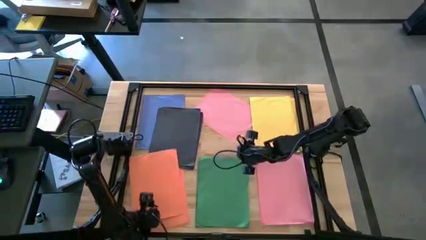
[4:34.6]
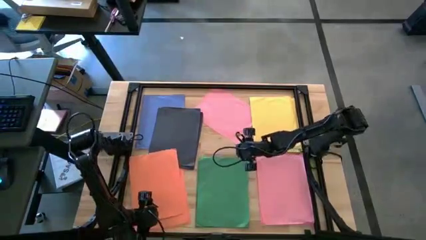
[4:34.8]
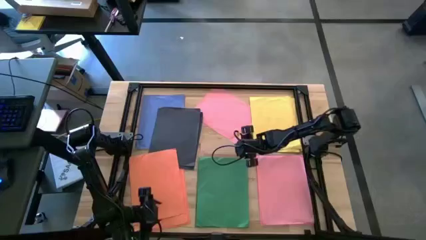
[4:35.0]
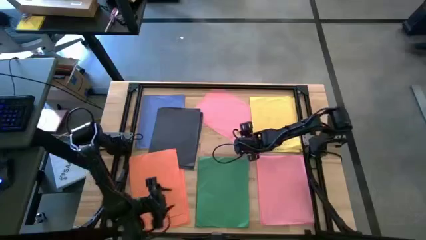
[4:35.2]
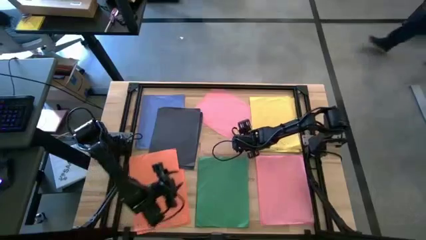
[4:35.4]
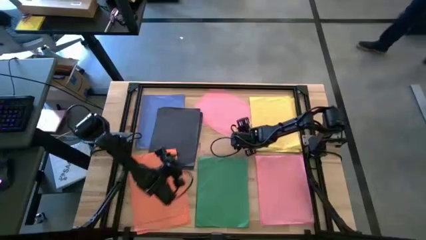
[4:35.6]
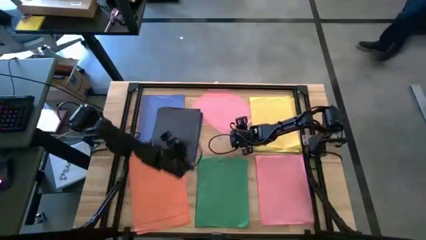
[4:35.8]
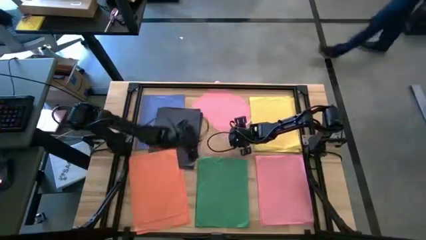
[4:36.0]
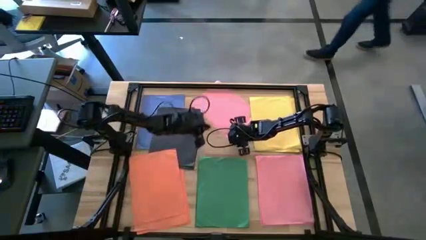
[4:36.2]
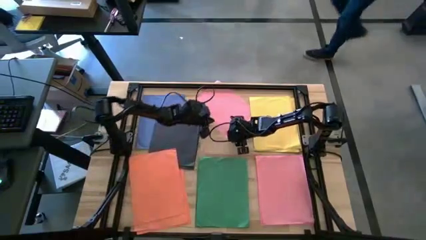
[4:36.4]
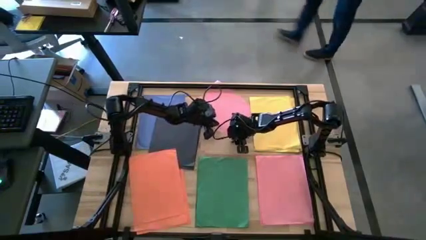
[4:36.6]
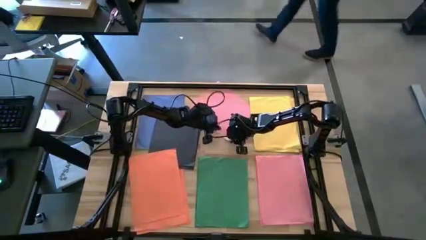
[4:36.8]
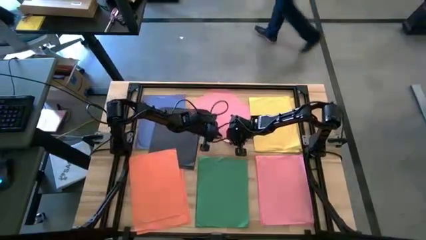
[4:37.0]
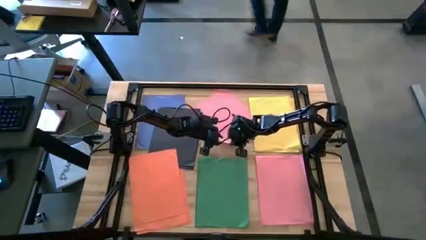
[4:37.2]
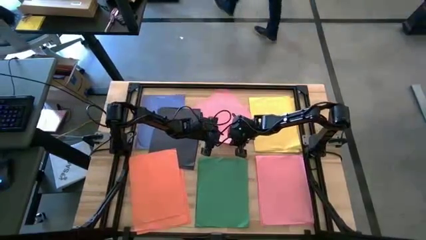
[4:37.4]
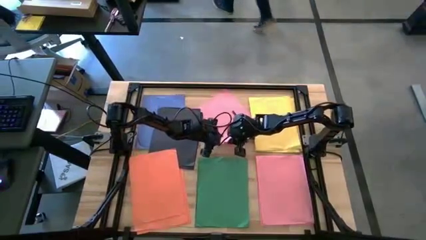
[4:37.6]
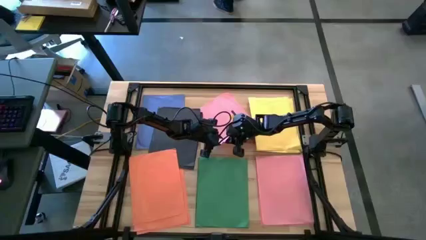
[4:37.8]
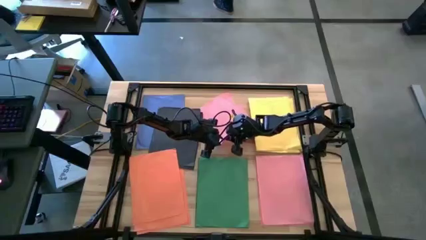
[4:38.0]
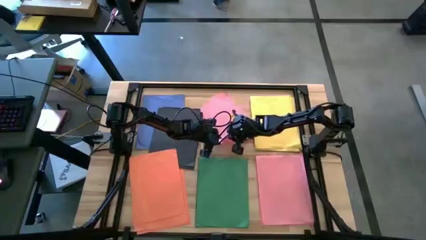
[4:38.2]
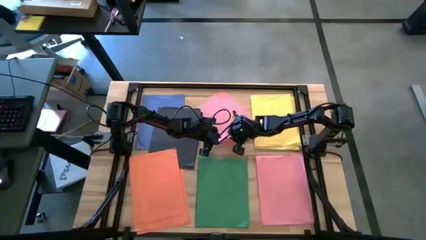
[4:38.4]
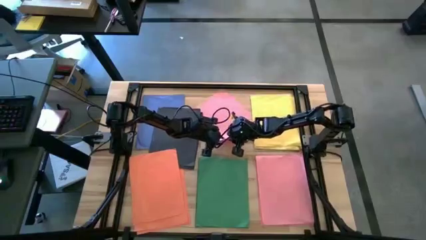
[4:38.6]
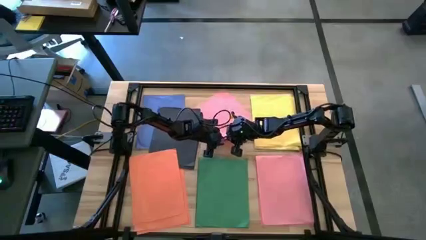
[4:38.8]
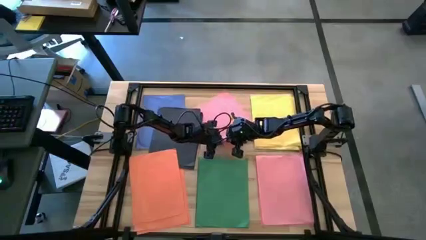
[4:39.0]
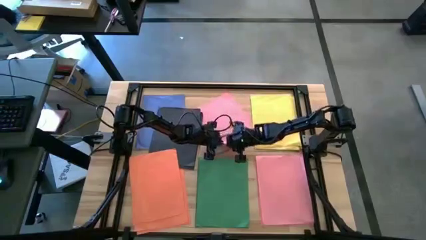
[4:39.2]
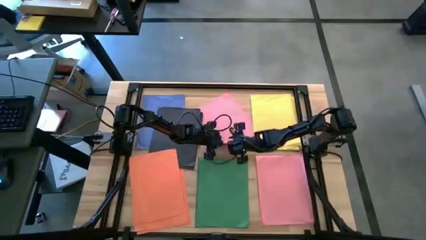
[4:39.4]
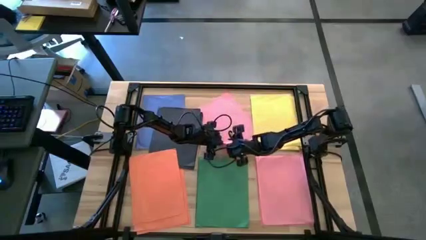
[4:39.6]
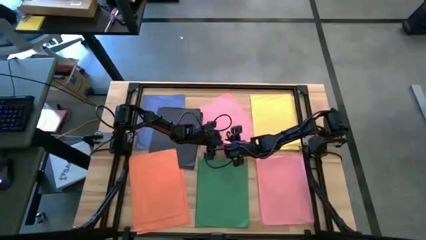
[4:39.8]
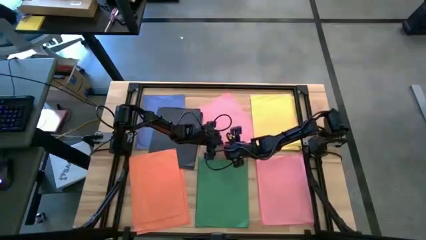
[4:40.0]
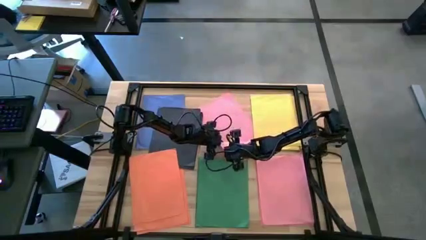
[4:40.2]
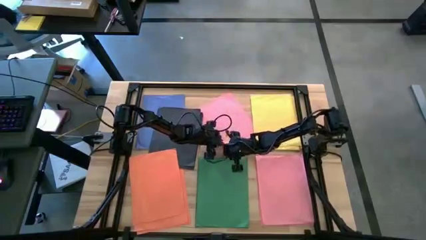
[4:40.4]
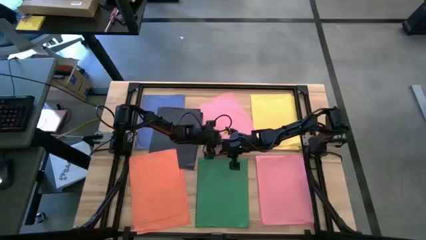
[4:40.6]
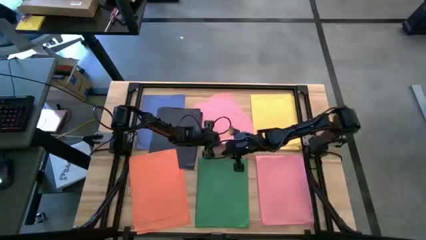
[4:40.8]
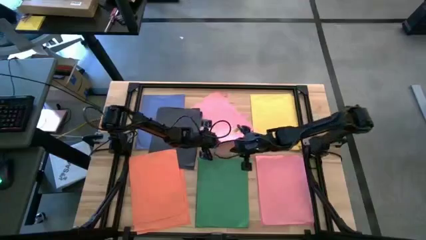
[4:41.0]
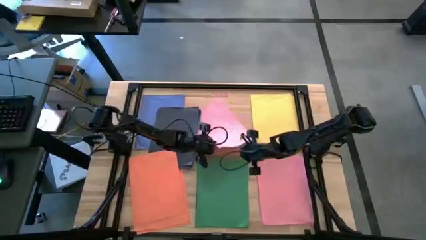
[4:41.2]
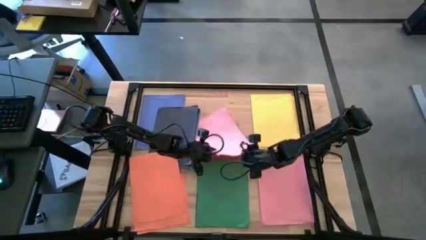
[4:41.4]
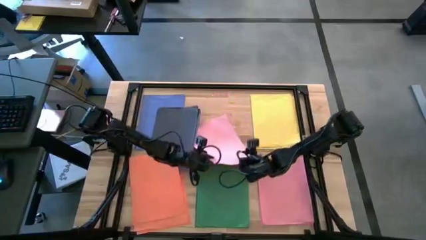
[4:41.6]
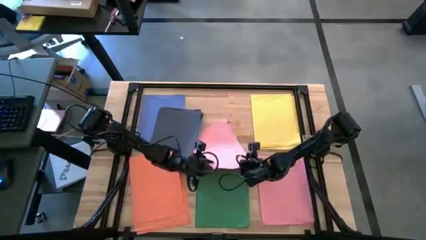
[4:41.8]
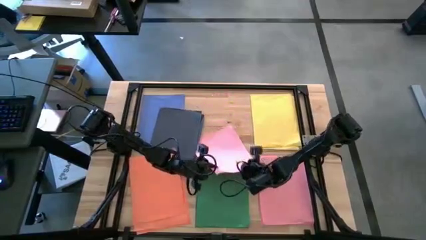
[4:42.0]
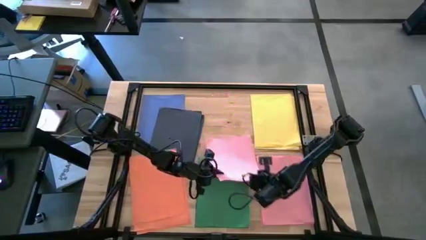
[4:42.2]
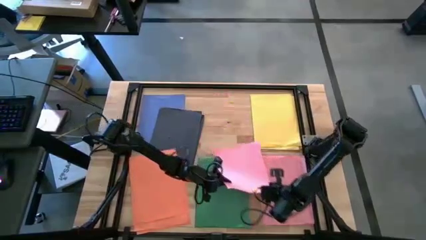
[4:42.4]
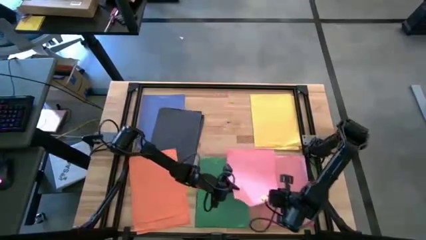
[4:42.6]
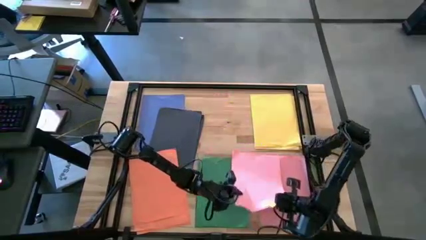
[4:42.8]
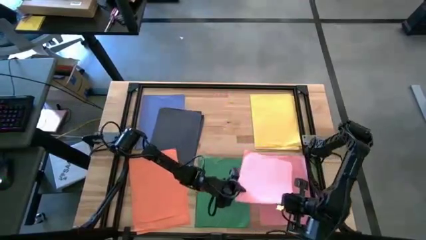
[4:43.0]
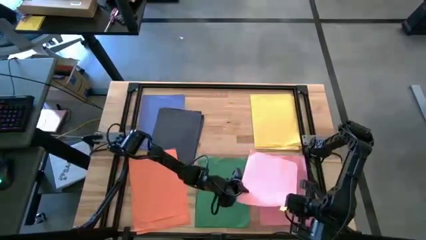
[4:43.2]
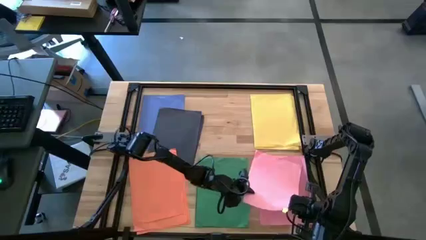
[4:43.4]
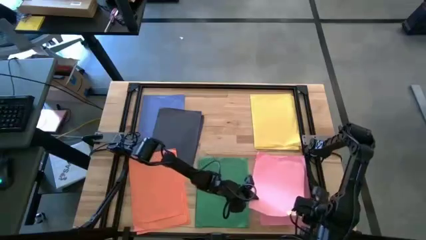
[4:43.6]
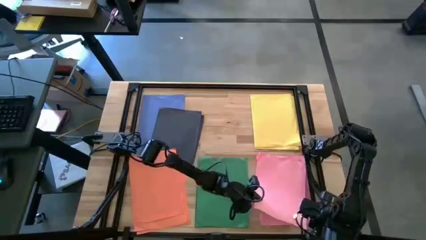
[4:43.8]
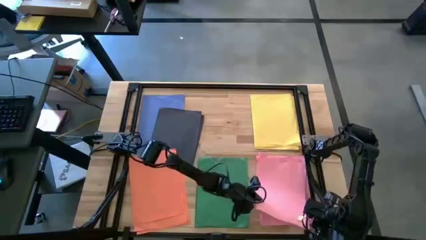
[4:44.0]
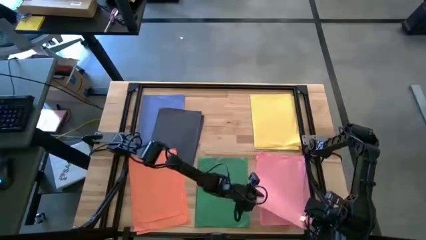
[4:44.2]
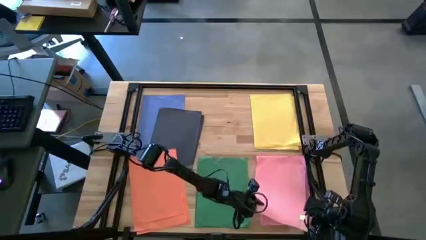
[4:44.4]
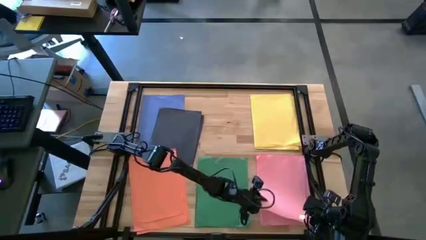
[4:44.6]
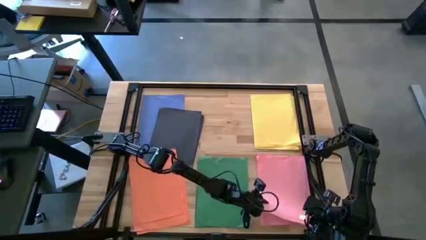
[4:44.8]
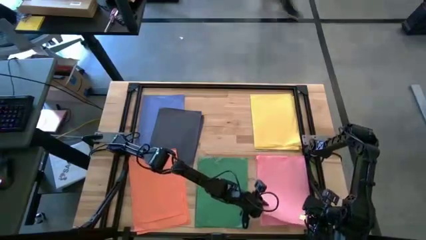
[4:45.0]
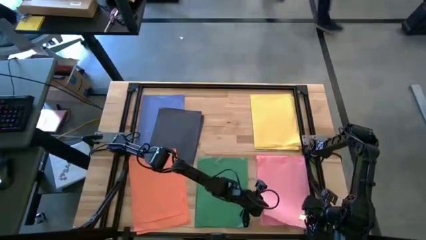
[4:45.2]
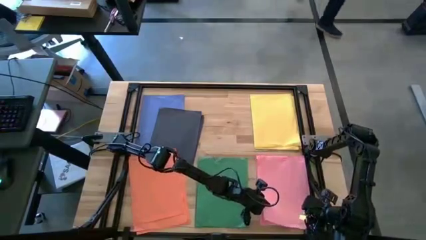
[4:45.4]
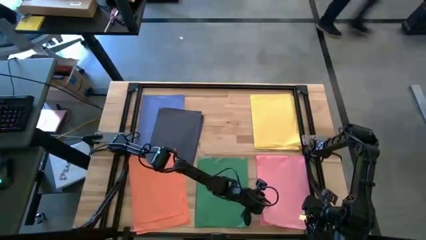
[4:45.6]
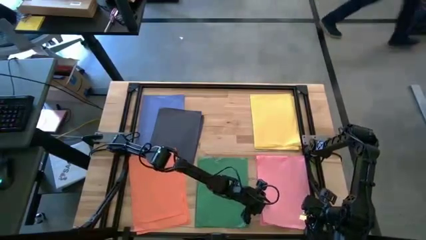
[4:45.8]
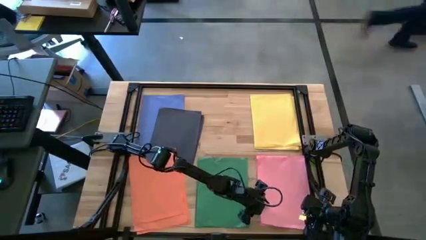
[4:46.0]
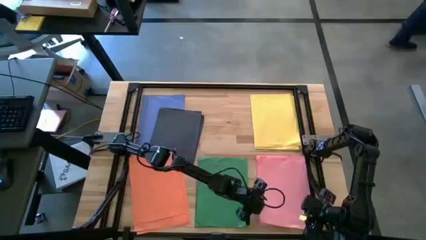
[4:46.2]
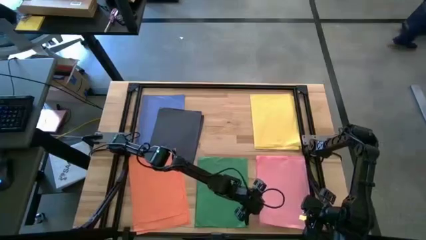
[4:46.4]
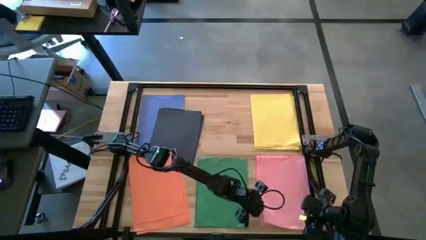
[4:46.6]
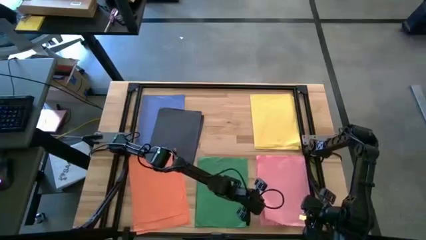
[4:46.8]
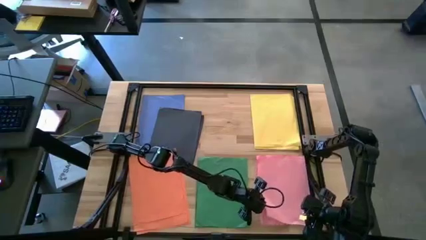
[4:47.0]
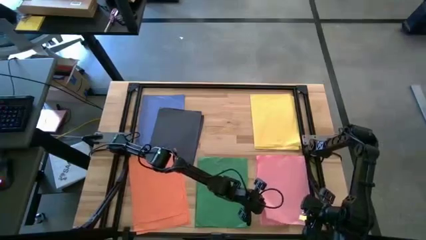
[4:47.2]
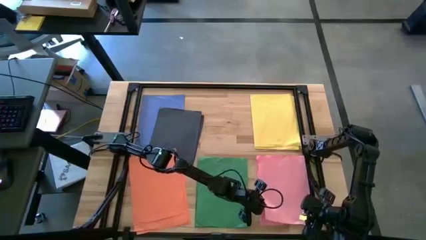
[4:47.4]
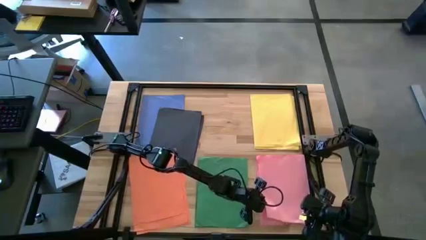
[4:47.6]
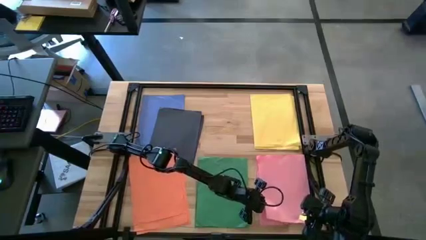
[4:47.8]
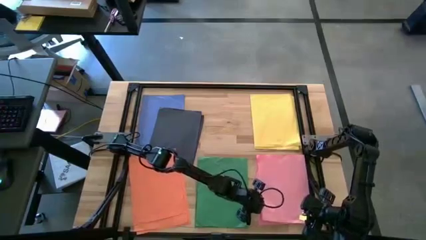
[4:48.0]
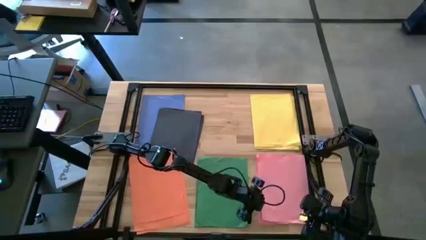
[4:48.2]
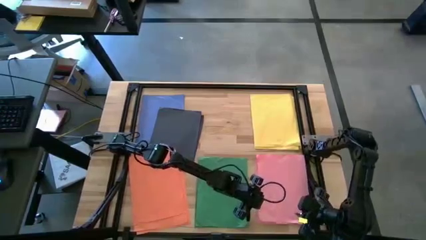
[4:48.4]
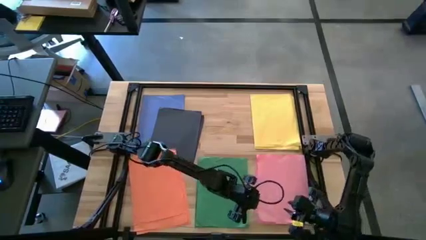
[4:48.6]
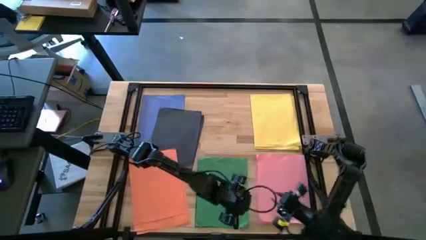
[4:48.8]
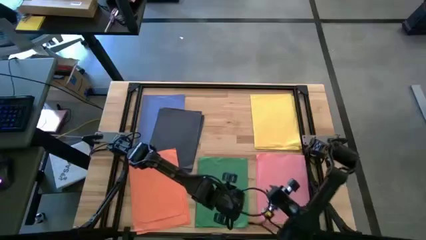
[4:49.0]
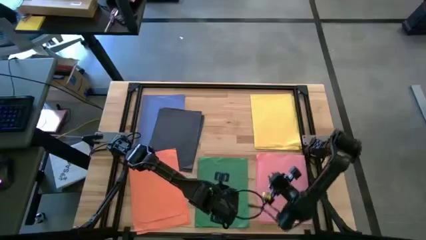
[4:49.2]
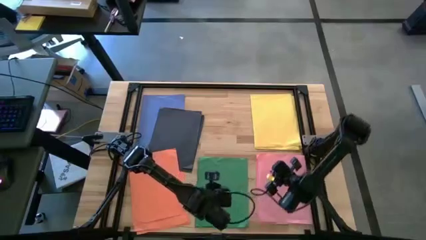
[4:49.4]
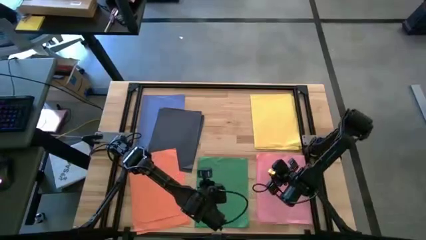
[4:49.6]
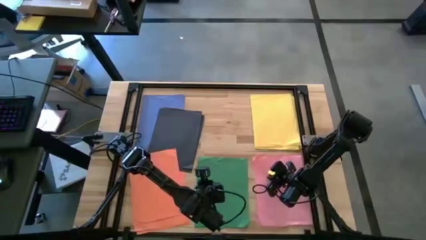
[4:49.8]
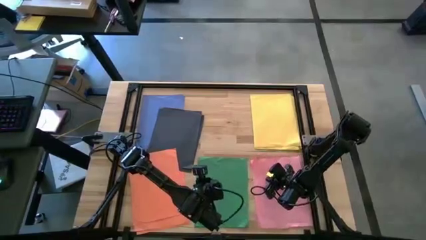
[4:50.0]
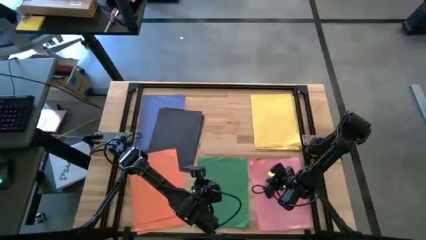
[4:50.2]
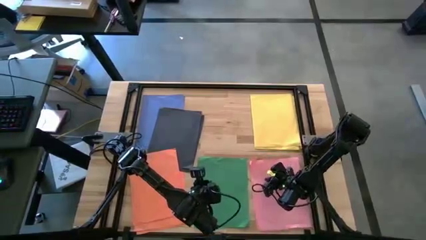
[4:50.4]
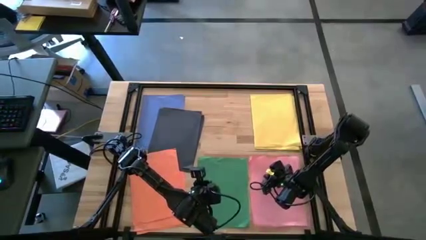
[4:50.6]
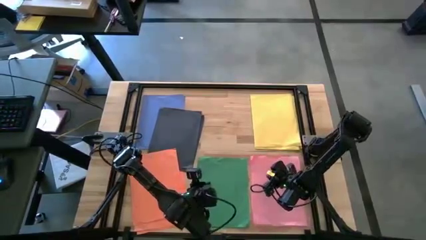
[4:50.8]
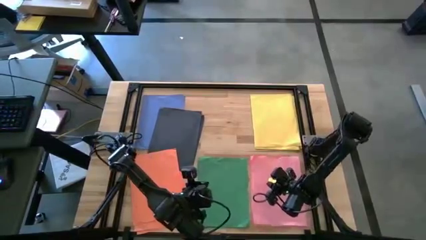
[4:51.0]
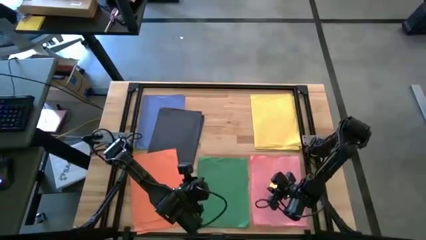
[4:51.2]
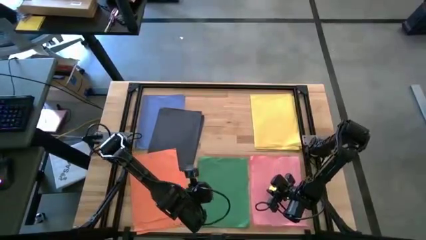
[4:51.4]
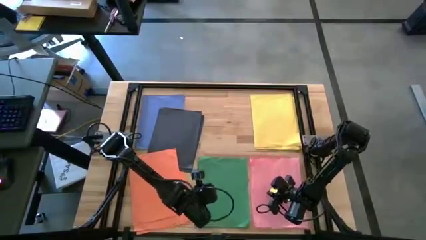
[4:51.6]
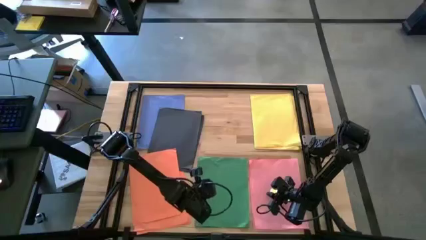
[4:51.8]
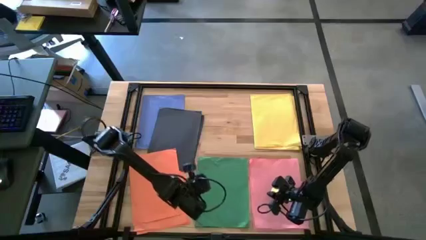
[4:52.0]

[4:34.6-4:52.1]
Task: Organize paper
Stack the top pink paper on the bottom pink paper
